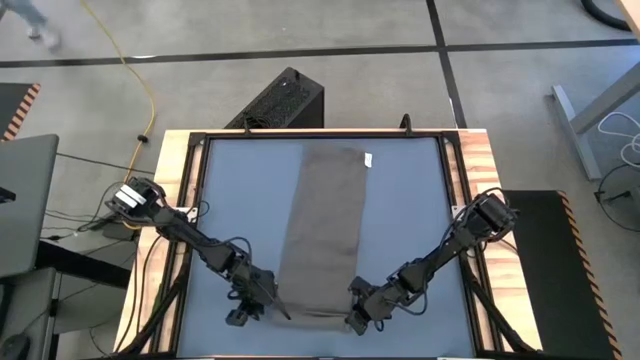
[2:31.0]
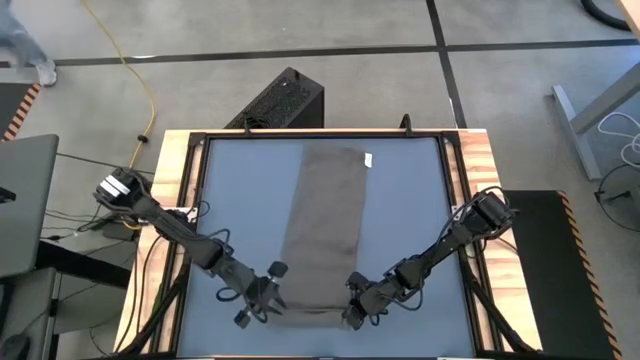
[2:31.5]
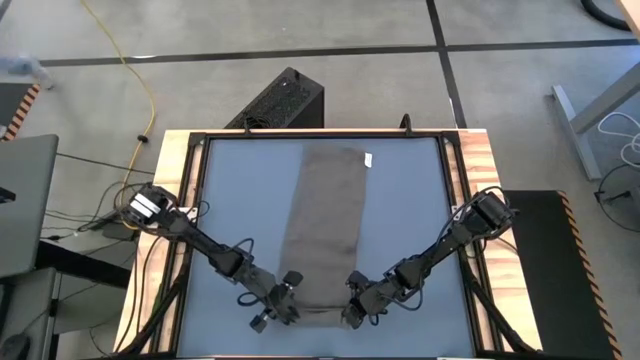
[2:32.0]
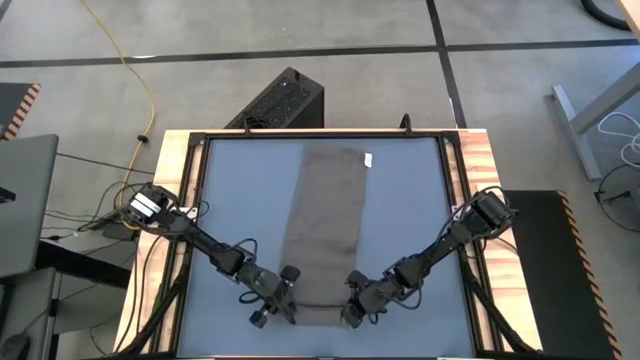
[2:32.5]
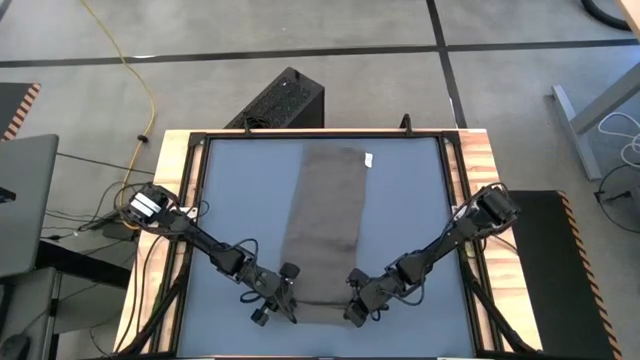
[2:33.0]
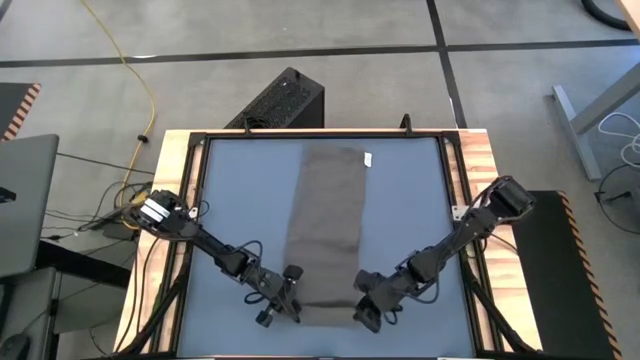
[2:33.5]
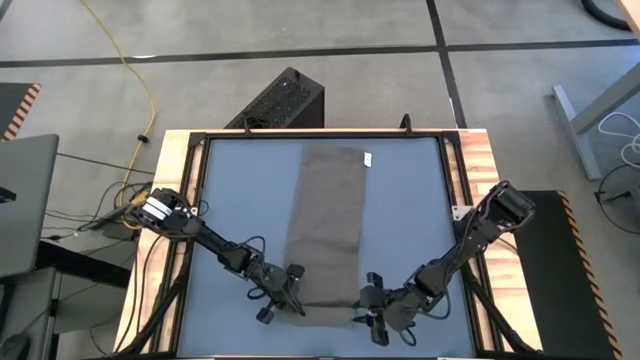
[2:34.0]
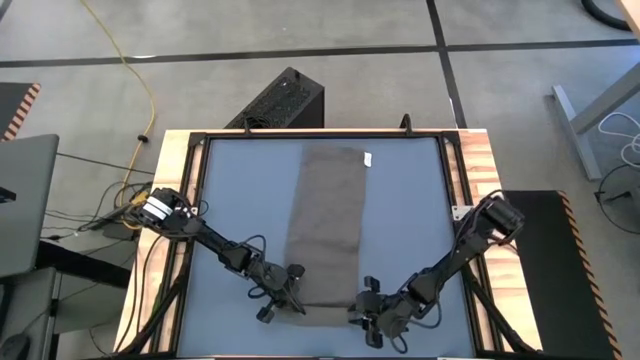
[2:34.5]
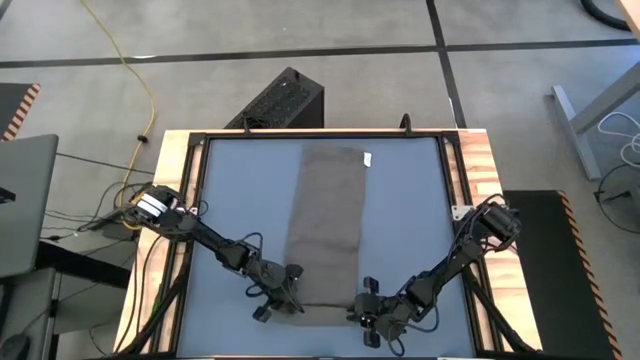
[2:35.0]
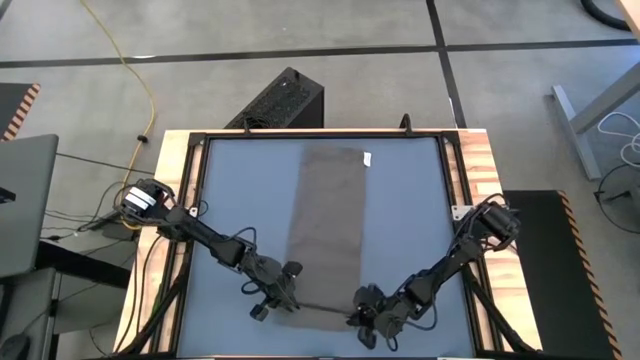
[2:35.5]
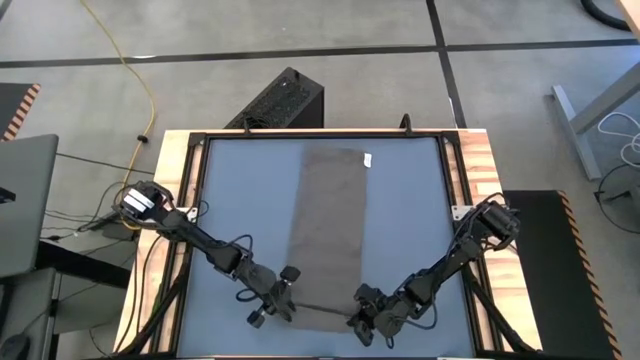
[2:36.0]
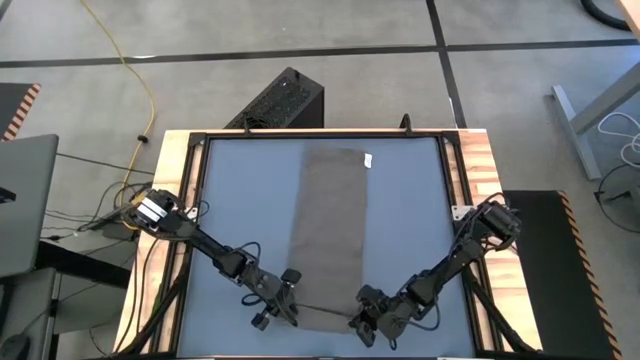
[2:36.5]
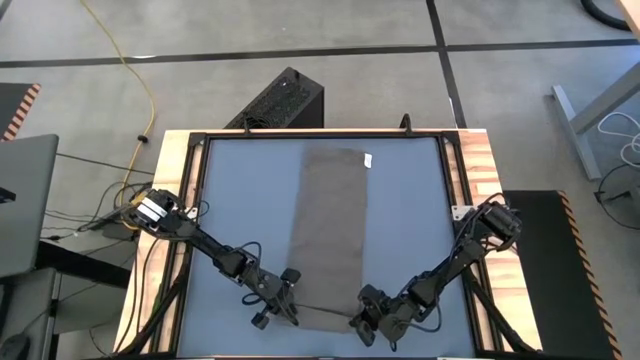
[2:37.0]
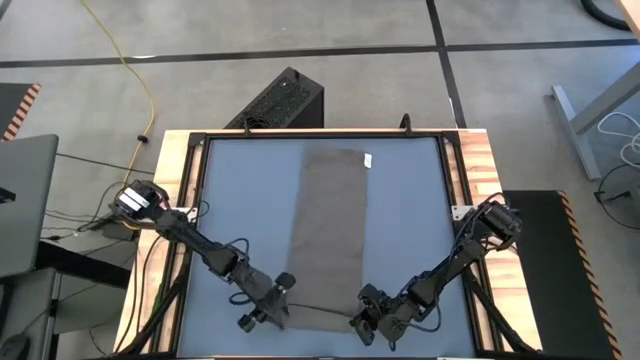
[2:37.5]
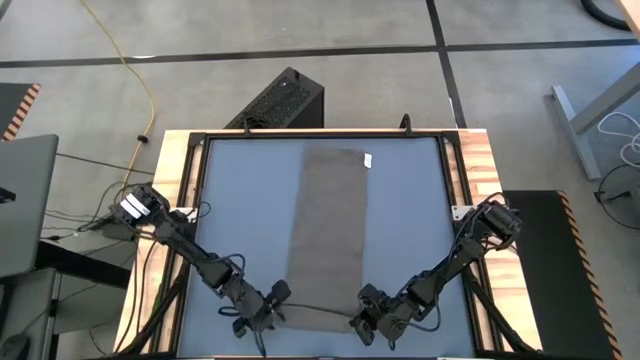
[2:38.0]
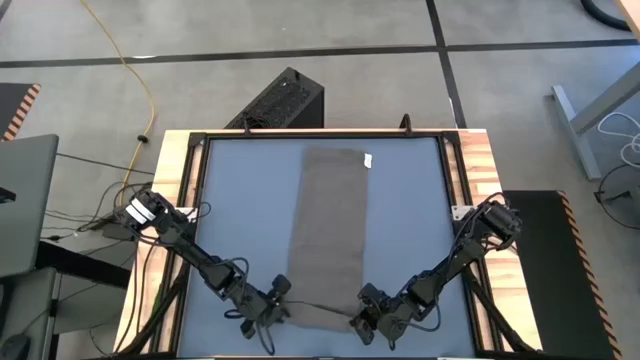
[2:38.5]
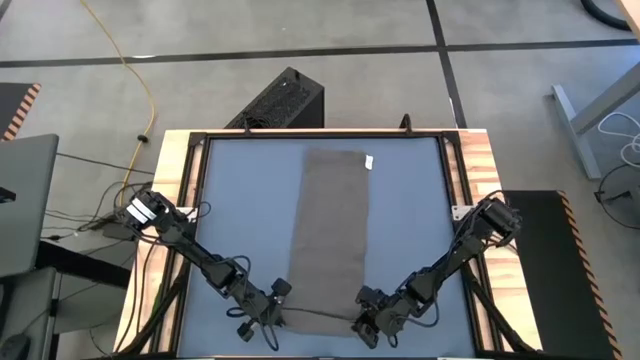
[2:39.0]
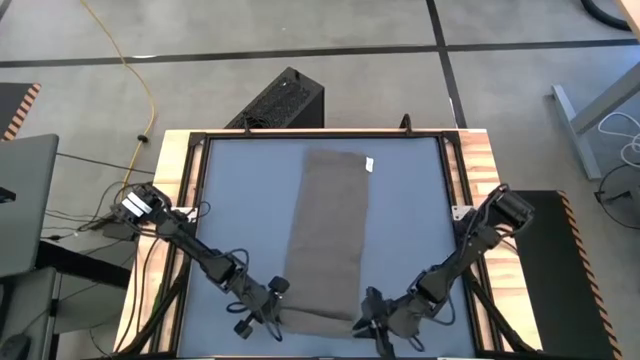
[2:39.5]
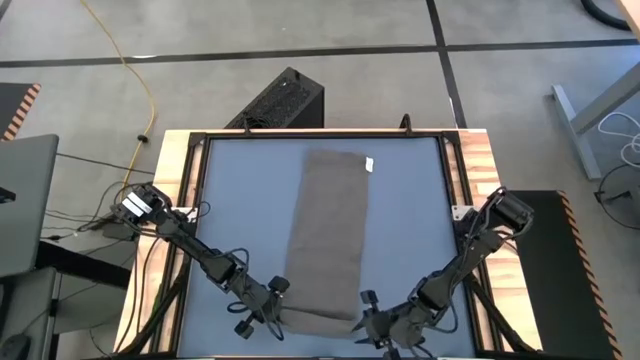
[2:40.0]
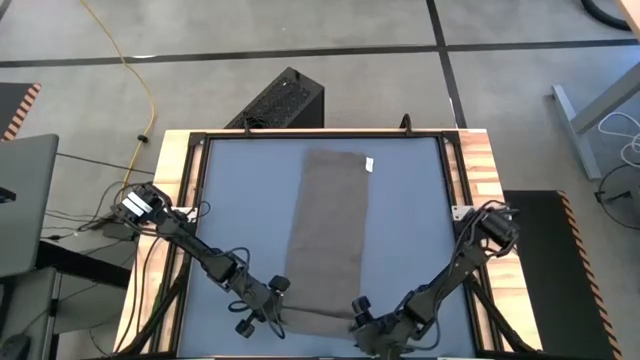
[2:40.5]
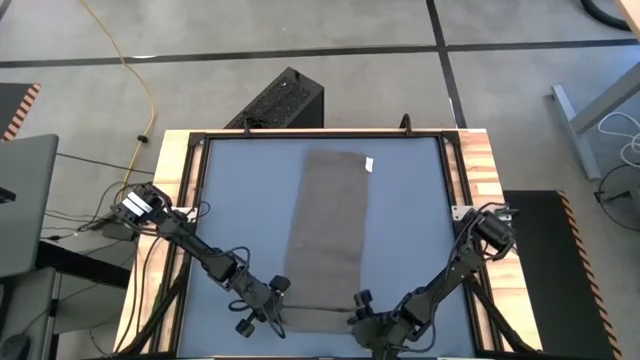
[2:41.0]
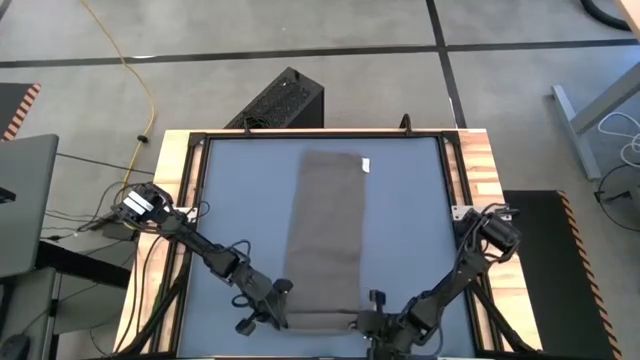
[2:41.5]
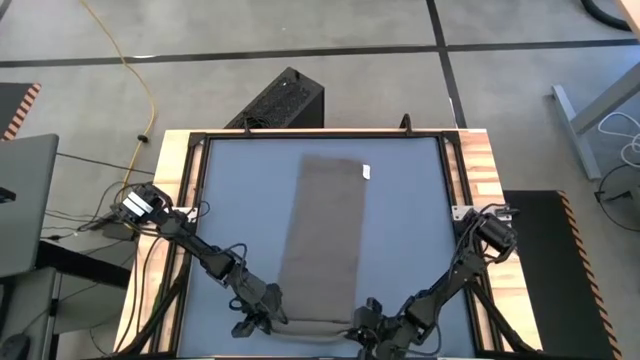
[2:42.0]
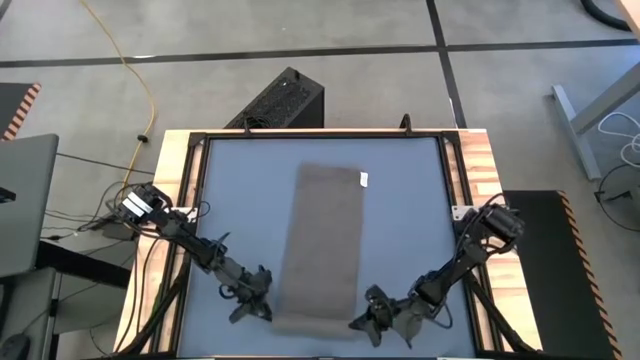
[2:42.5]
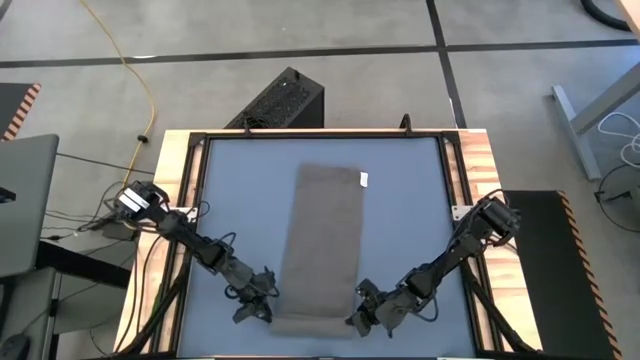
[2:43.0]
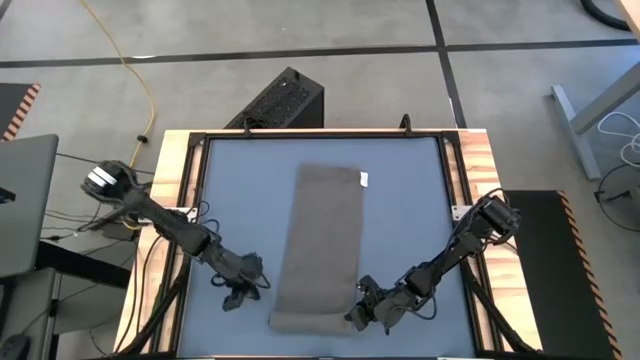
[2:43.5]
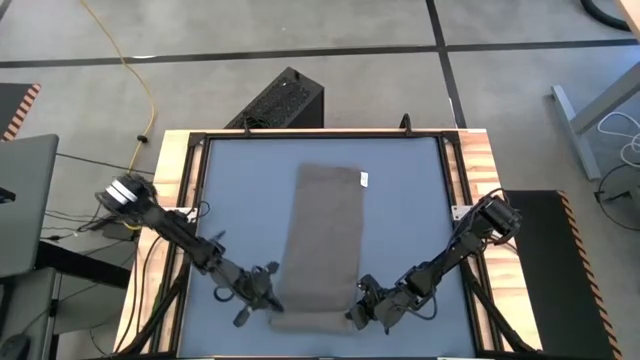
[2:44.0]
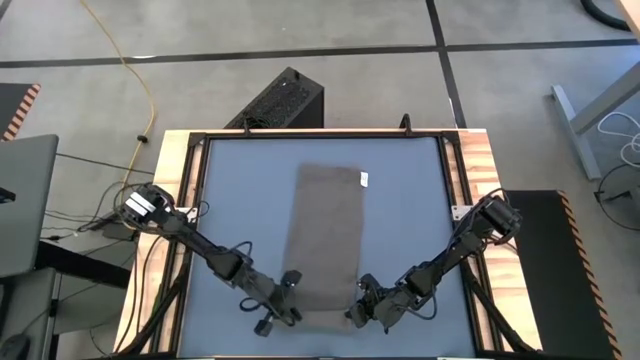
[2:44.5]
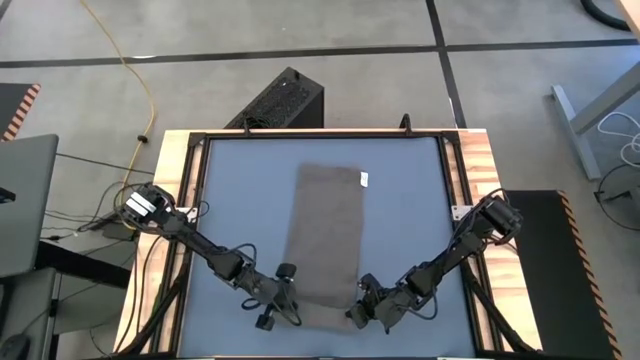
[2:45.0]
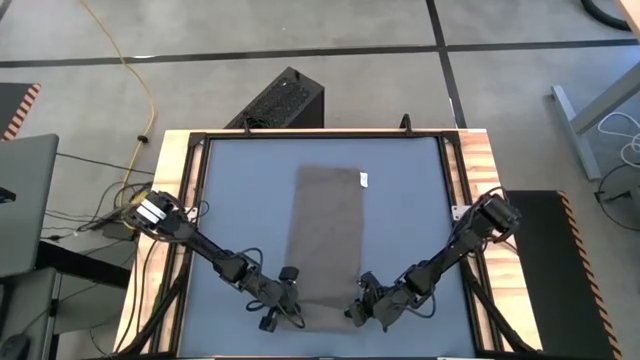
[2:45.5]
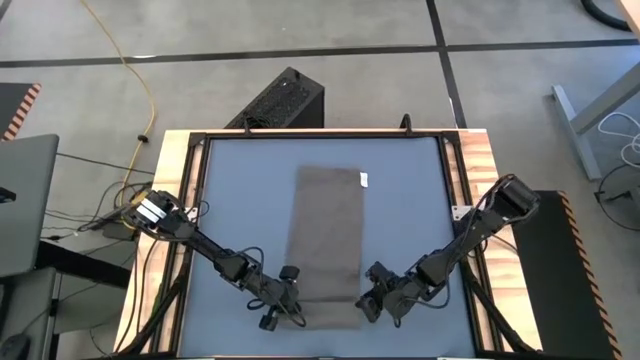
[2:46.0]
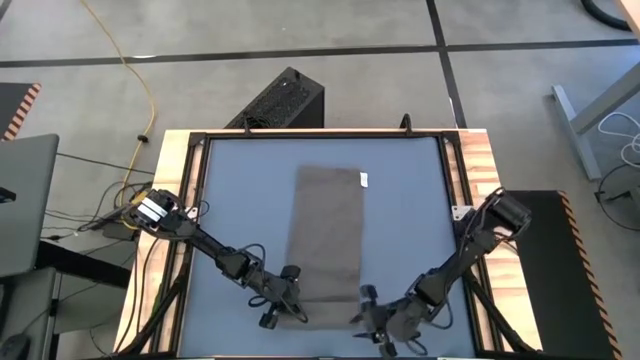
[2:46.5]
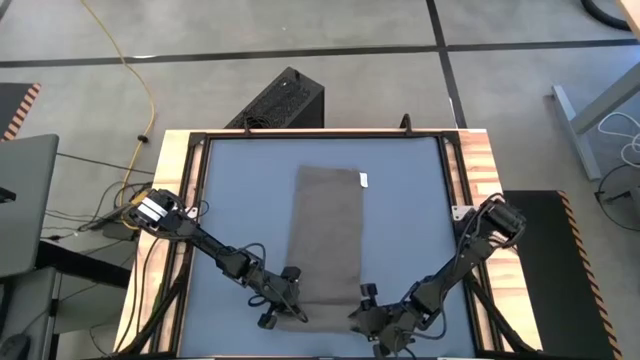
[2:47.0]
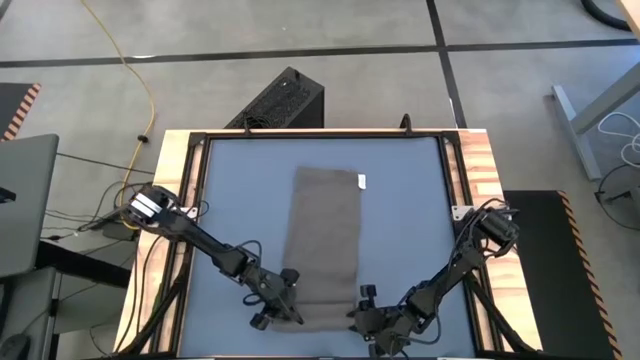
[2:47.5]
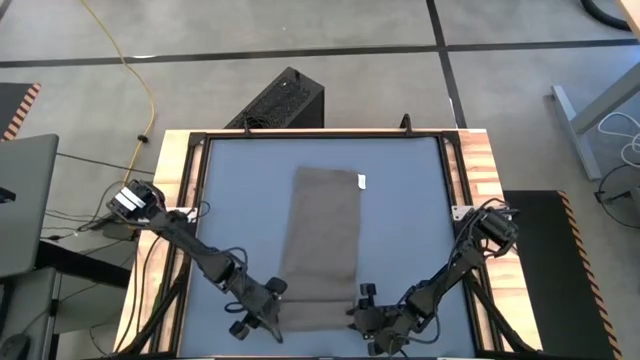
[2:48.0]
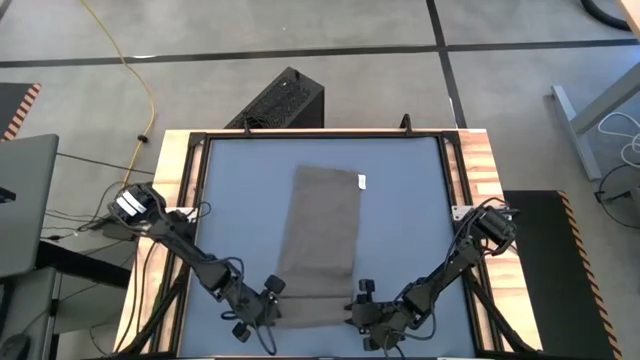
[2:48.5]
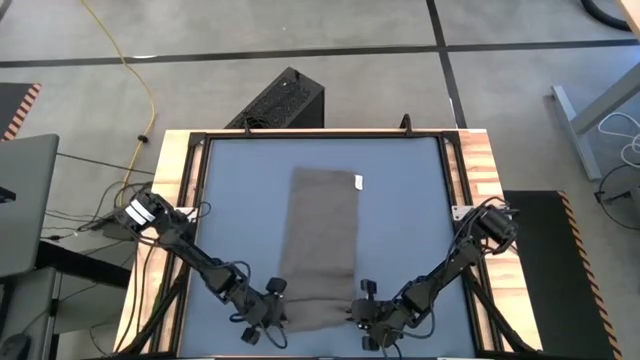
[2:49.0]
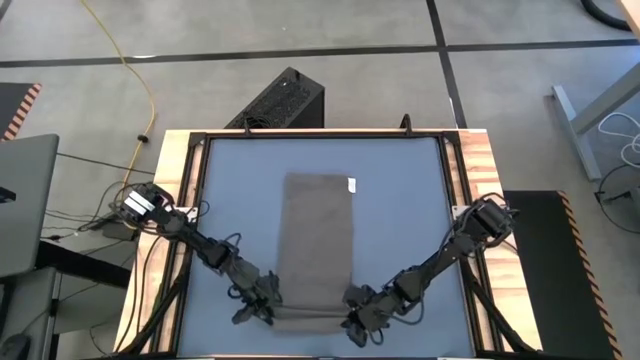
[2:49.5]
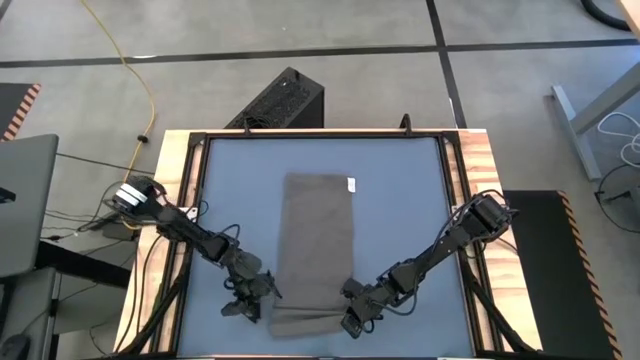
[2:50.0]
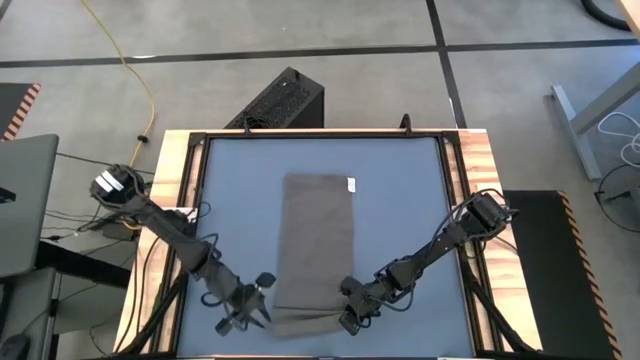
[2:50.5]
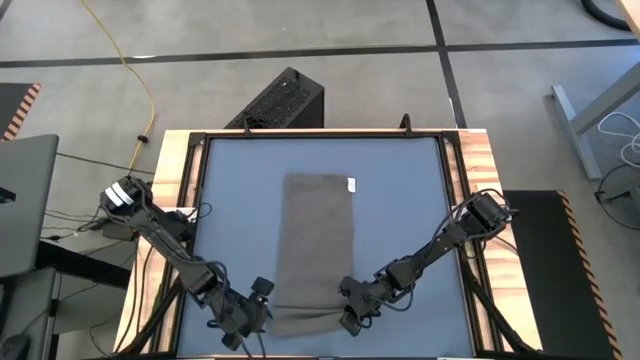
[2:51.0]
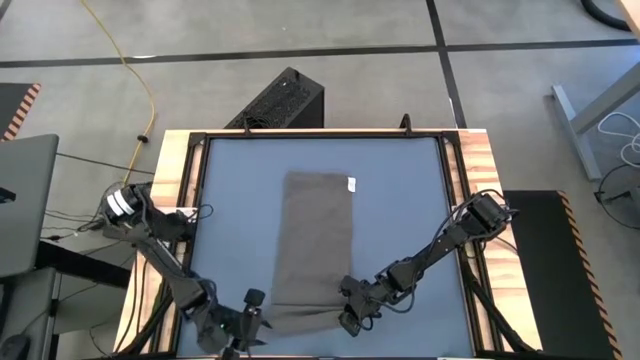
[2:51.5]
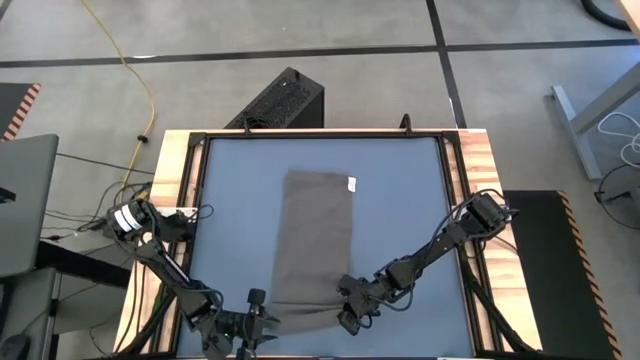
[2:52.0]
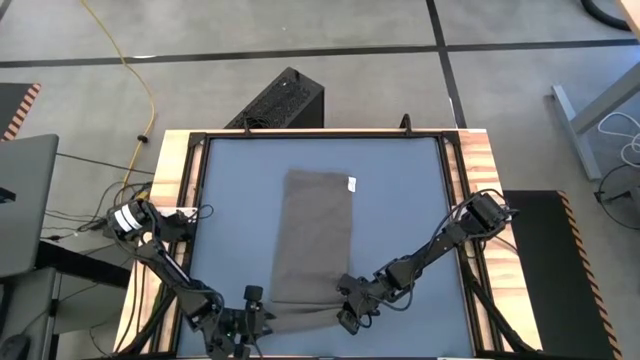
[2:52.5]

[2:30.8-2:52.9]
Task: Roll towel
Roll the gray towel
